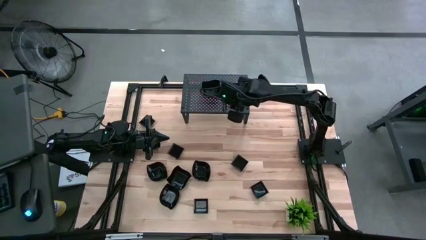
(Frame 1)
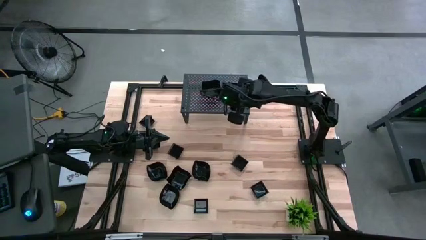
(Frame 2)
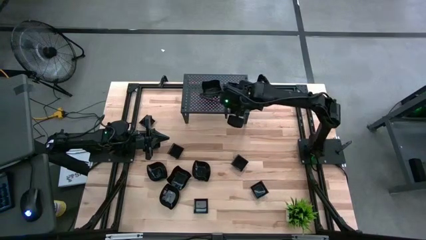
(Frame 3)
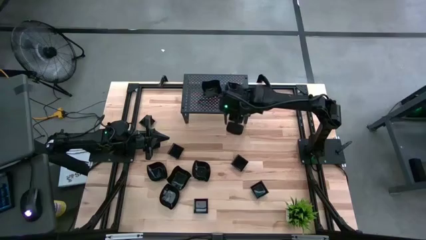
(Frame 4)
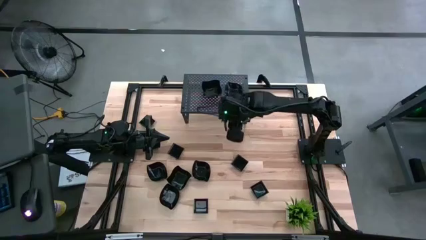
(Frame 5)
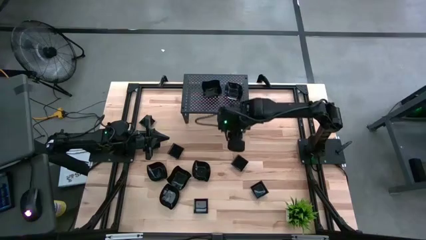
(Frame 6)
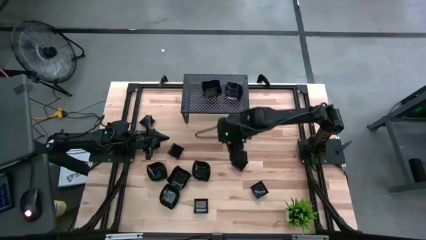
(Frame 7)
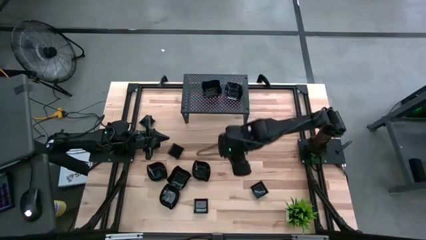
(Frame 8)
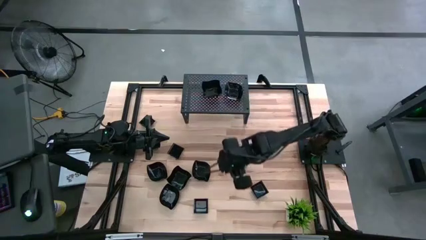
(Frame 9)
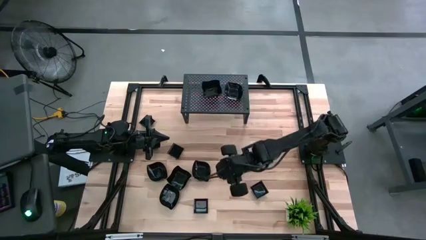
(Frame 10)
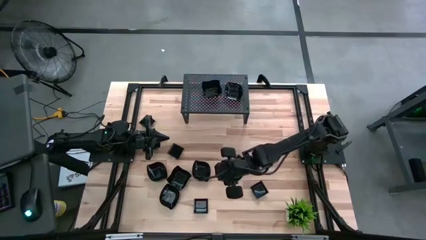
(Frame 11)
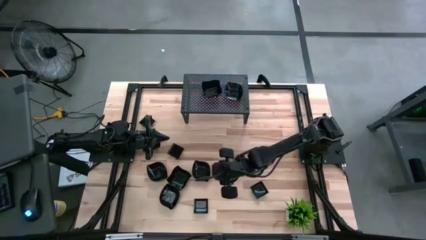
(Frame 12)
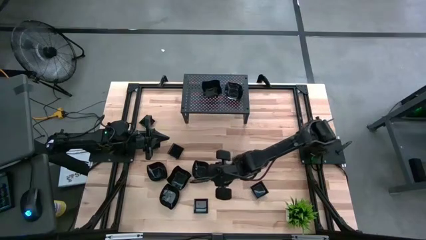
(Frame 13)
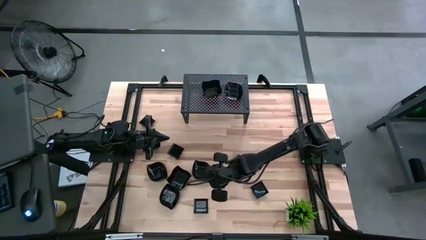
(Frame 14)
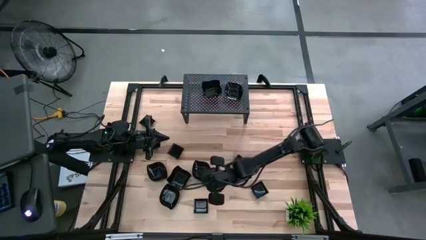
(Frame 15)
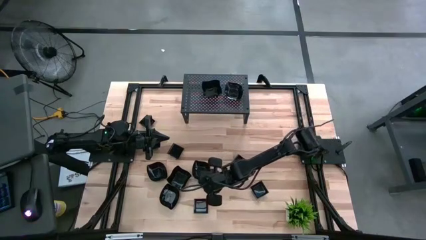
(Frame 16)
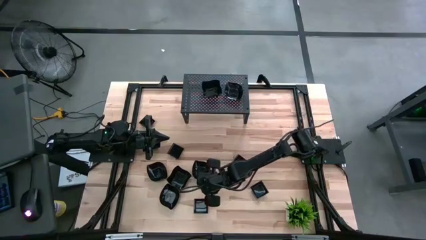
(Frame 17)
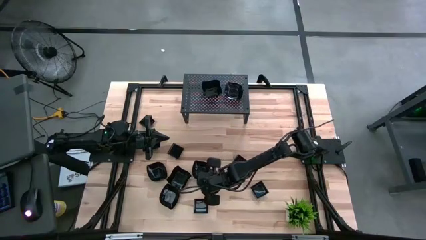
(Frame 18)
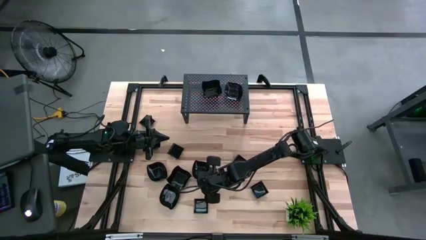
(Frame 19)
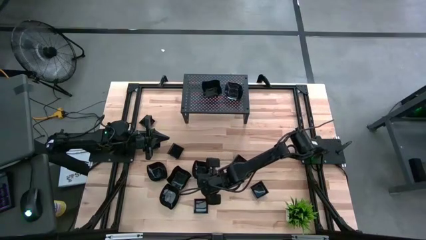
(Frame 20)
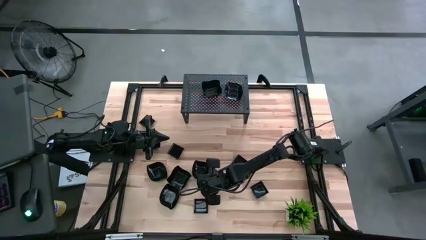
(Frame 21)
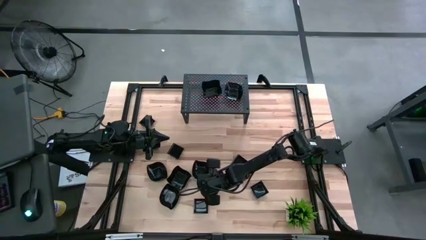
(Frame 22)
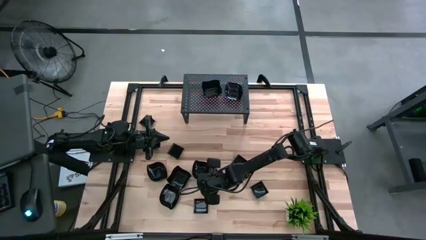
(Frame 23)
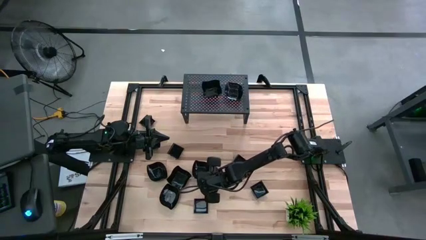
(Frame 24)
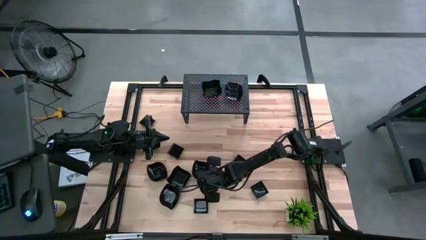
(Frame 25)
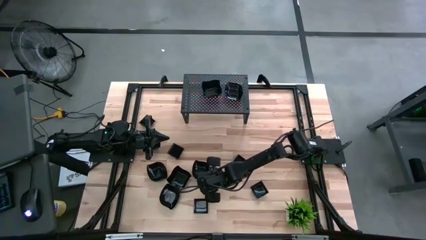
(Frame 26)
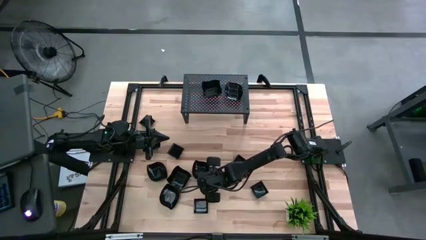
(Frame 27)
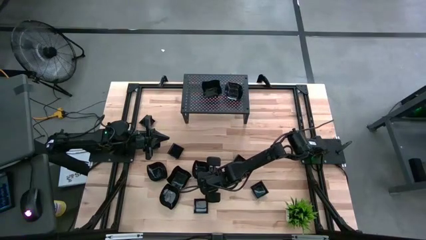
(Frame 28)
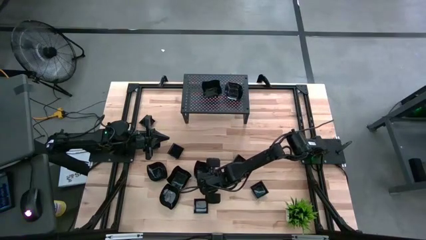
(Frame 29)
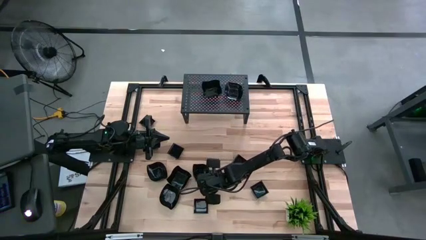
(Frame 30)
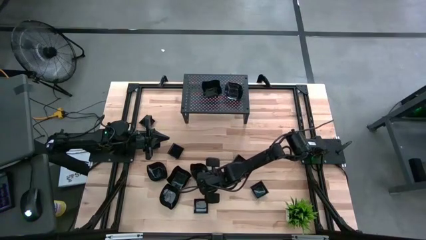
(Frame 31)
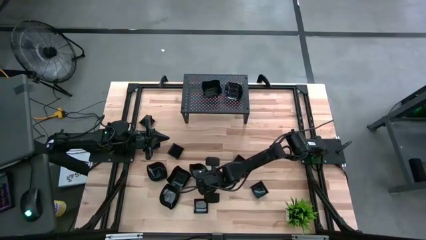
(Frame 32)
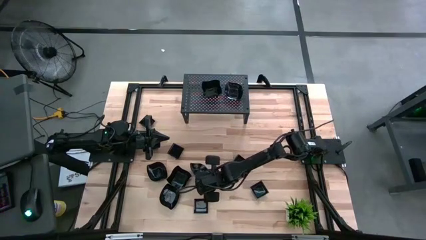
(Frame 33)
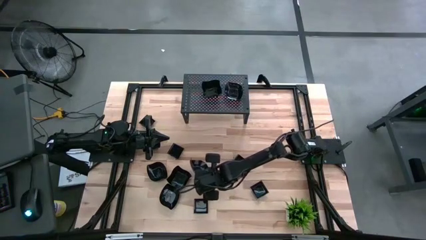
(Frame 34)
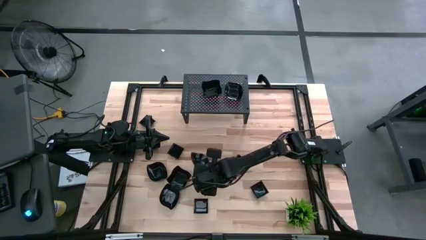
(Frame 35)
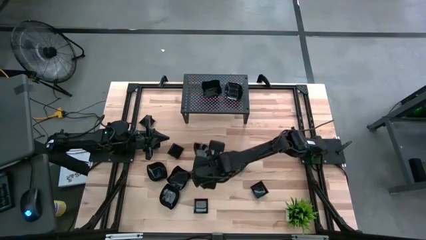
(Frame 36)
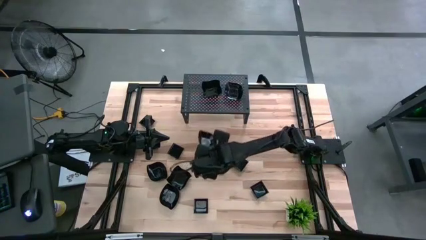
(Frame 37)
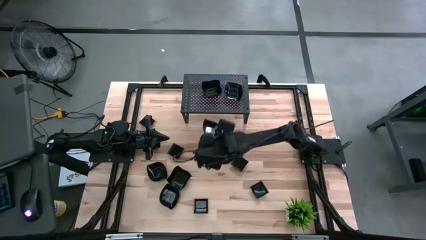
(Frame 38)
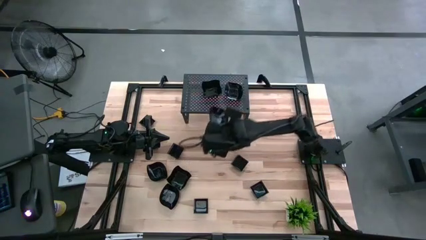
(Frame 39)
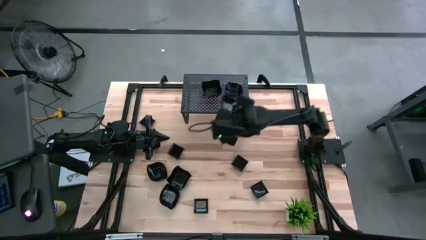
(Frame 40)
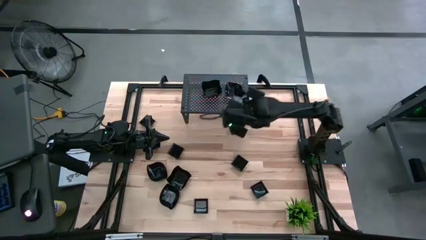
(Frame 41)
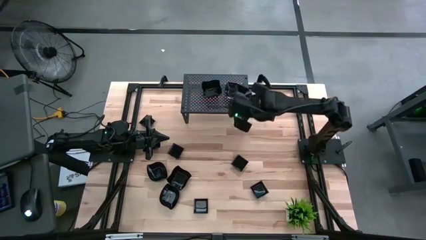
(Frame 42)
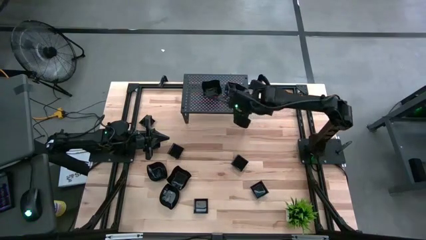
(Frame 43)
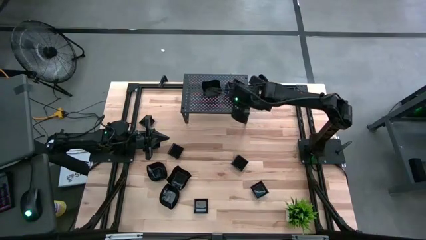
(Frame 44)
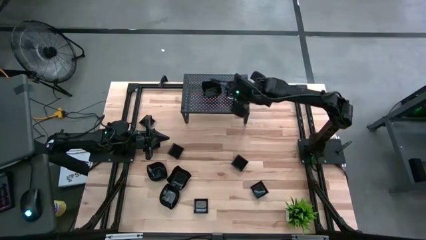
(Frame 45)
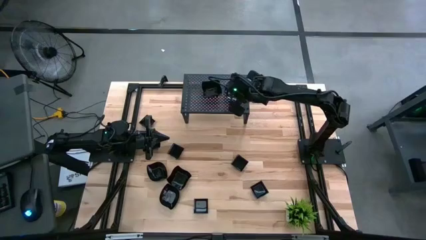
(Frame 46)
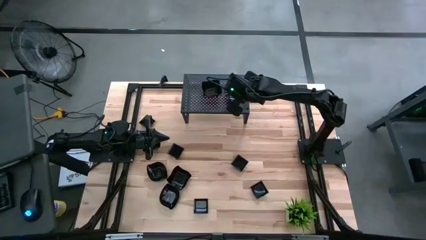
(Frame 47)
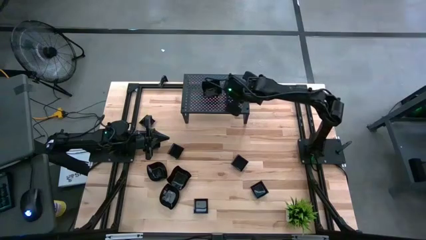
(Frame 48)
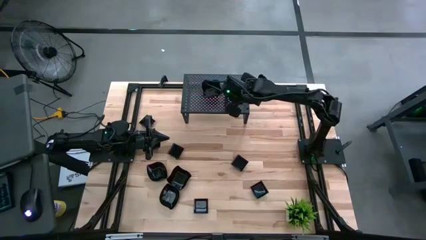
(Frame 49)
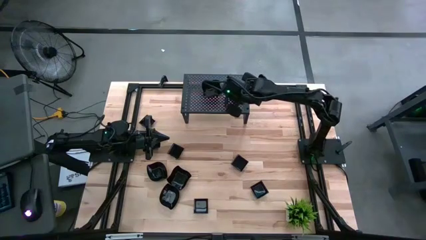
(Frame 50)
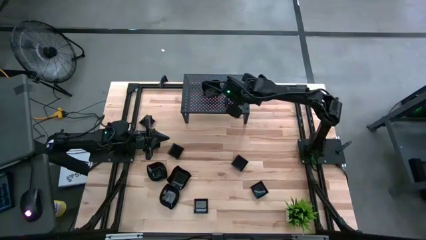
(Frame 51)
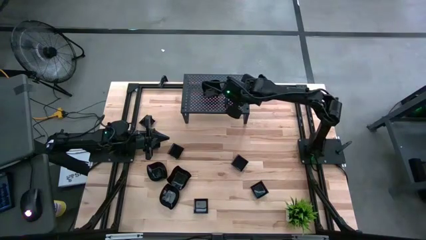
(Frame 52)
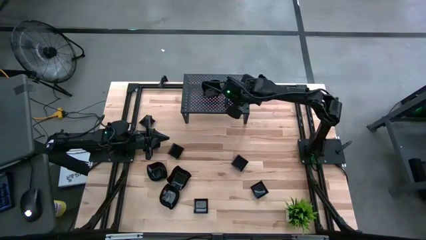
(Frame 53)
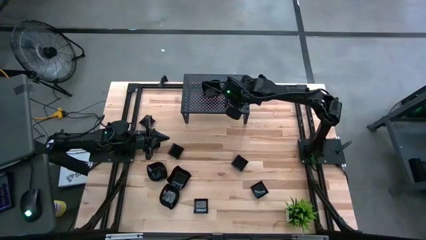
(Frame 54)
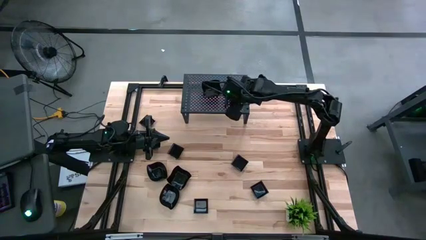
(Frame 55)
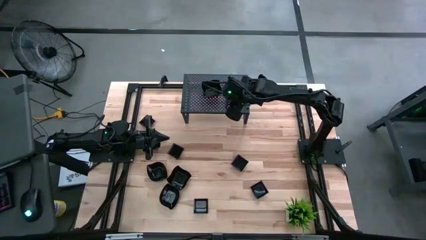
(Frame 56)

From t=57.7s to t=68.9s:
Task: Pick & Place Mini shaped plates
Stack the leaf-shaped plate on top of the leaf-shaped plate on the shelf
